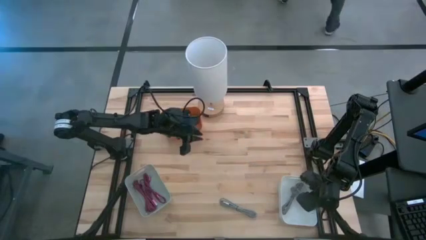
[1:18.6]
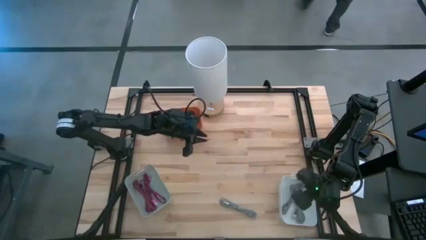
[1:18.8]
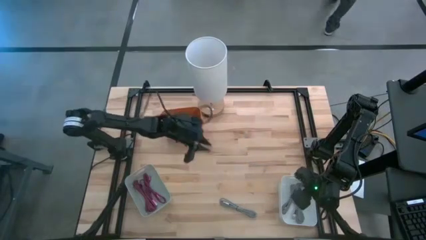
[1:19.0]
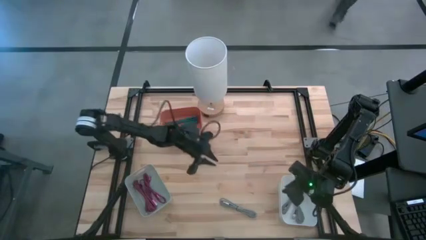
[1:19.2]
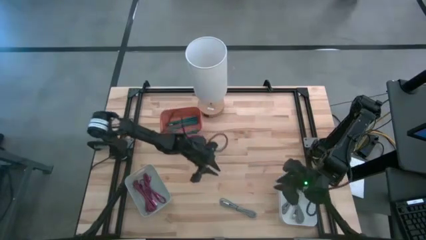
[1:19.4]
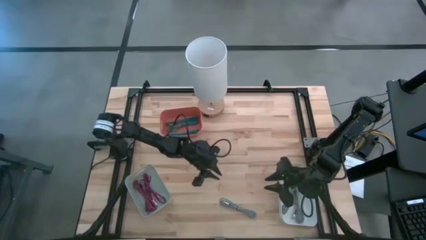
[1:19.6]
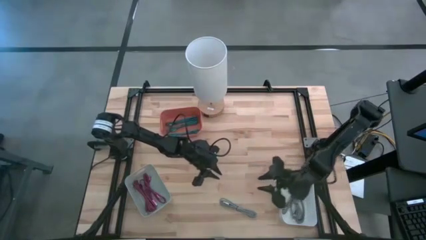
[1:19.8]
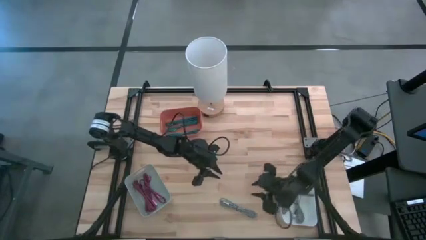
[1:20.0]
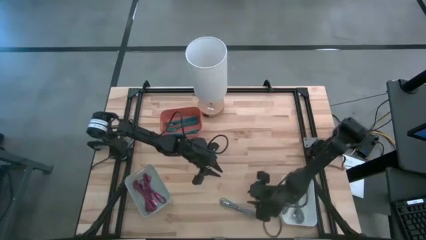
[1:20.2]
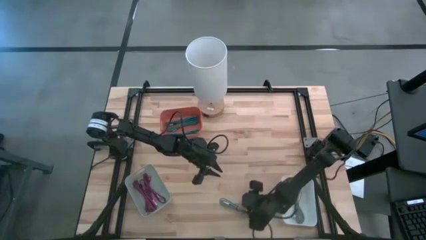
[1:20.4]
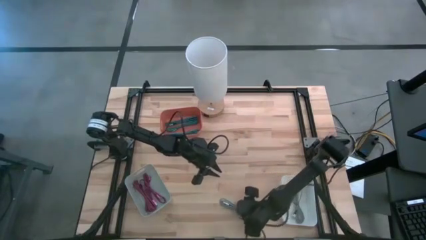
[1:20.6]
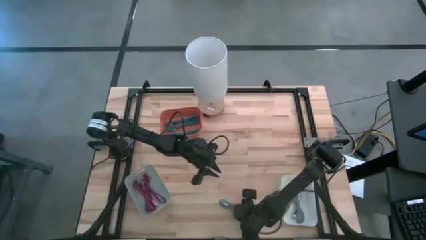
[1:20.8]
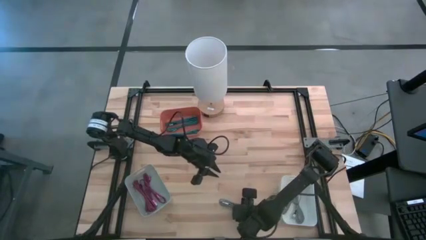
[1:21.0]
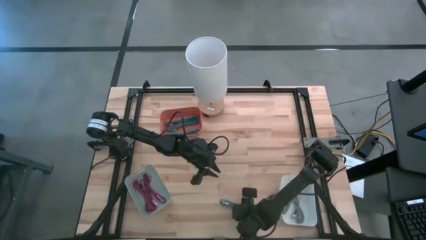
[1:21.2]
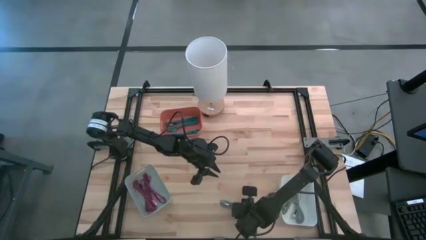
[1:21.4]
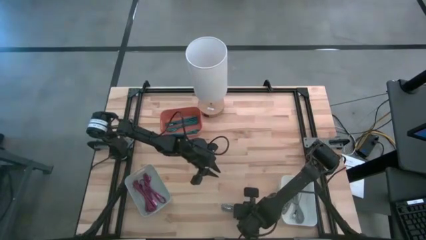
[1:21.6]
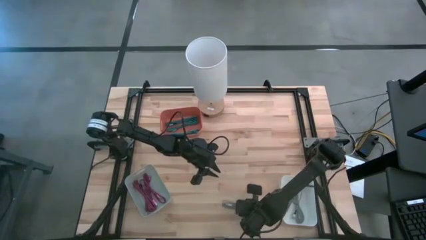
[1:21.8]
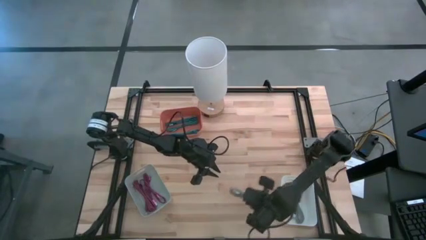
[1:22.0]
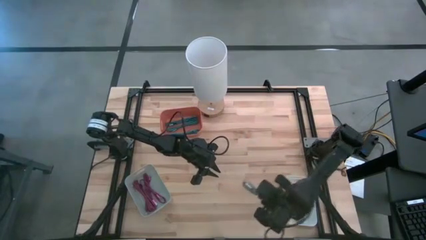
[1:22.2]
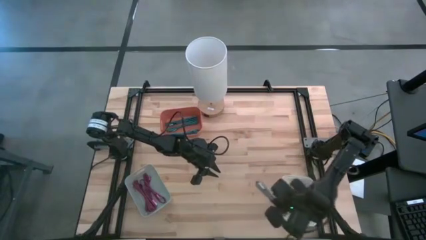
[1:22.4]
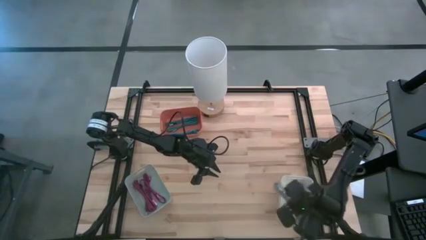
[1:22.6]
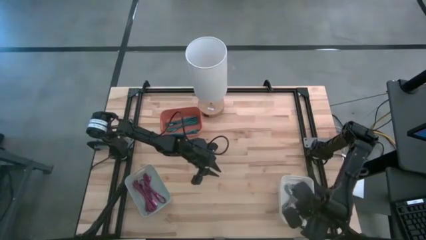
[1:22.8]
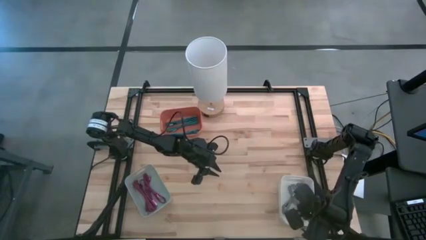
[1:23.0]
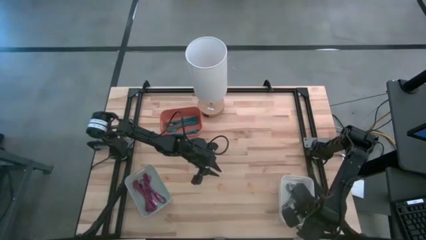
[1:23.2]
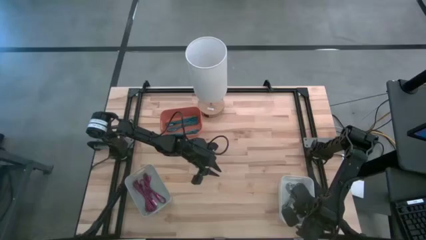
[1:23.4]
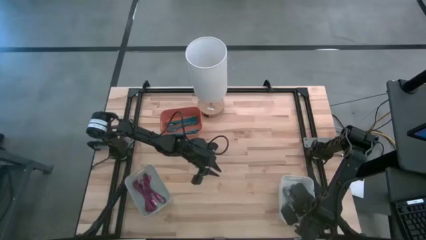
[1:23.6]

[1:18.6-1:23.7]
Task: Pick & Place USB Port
Put the white charger cable into the white bin

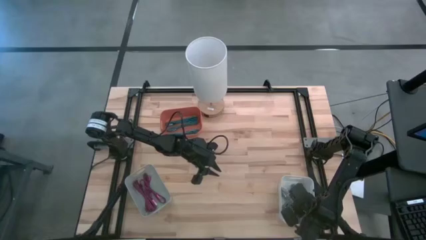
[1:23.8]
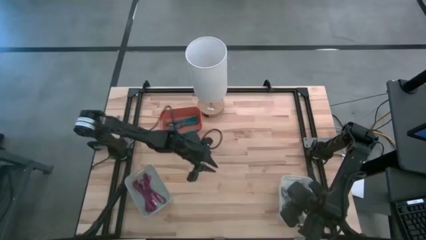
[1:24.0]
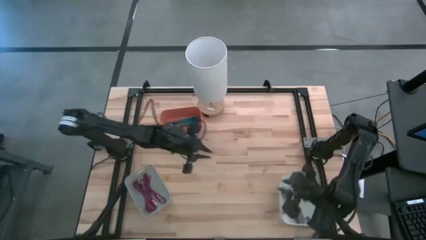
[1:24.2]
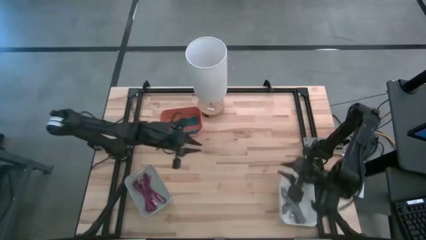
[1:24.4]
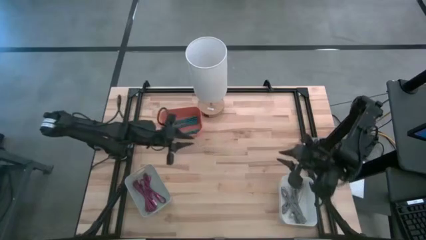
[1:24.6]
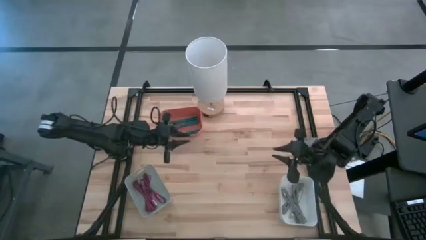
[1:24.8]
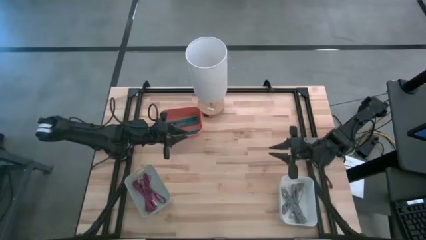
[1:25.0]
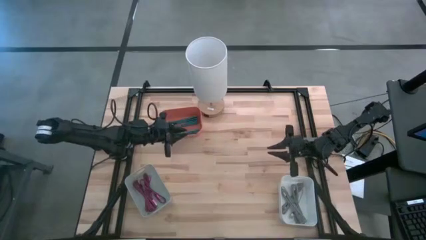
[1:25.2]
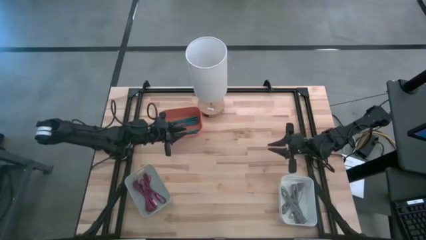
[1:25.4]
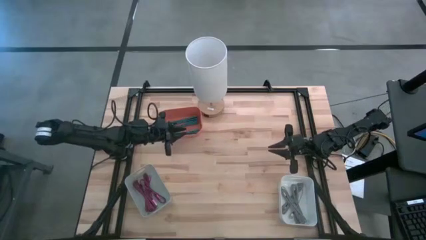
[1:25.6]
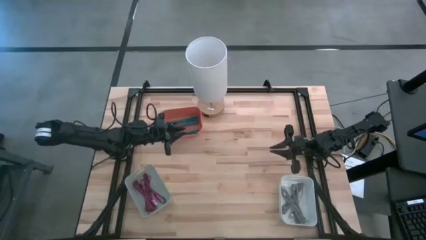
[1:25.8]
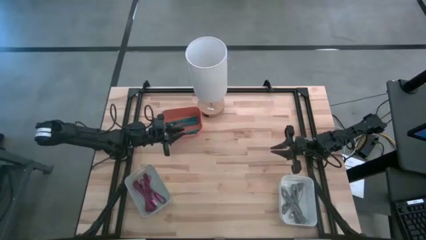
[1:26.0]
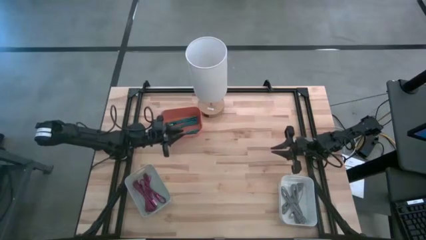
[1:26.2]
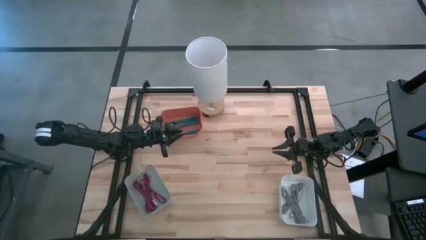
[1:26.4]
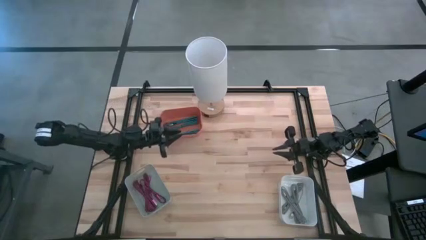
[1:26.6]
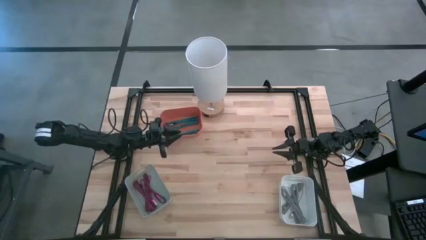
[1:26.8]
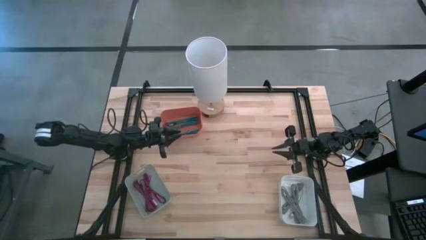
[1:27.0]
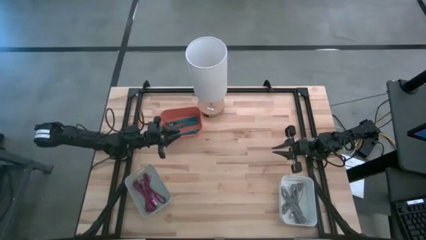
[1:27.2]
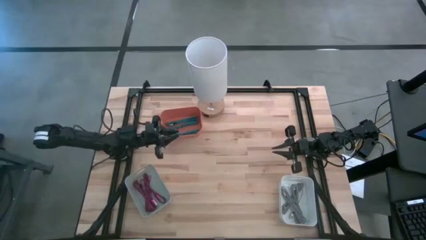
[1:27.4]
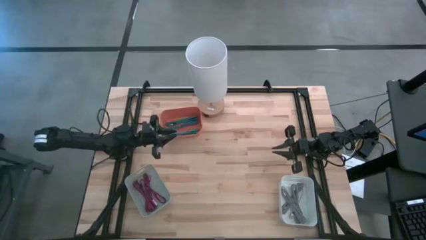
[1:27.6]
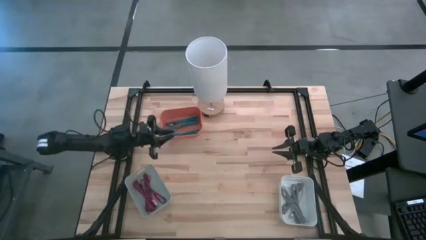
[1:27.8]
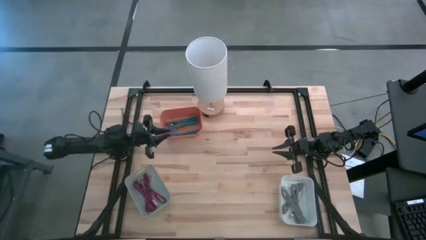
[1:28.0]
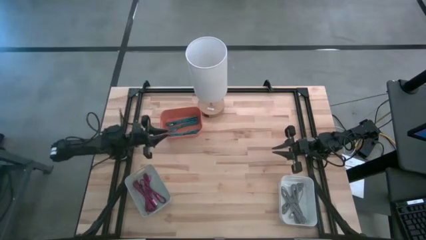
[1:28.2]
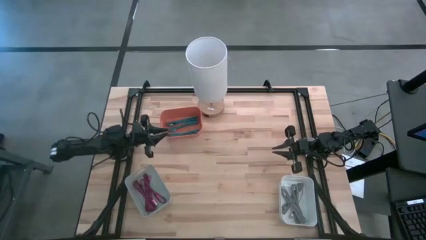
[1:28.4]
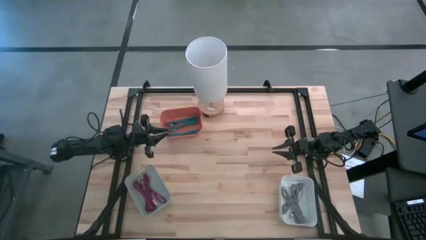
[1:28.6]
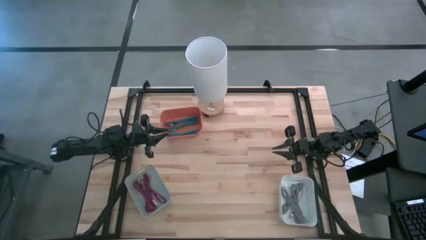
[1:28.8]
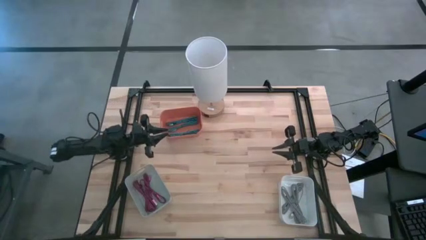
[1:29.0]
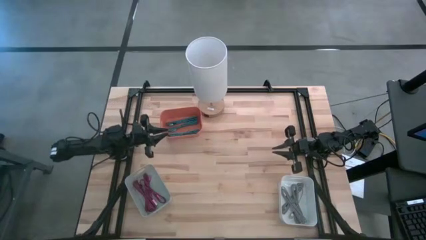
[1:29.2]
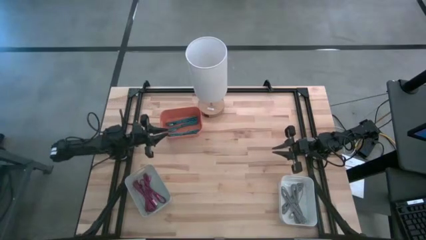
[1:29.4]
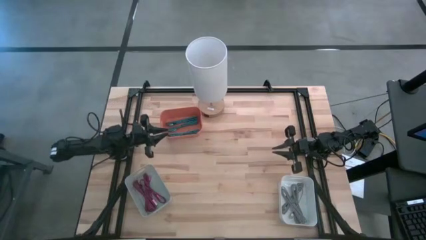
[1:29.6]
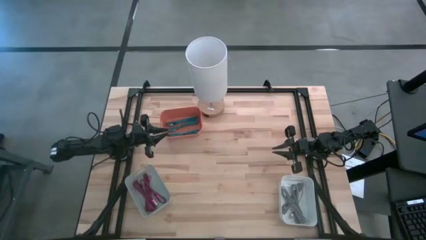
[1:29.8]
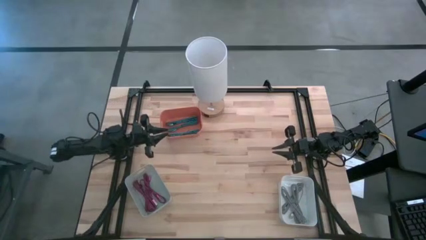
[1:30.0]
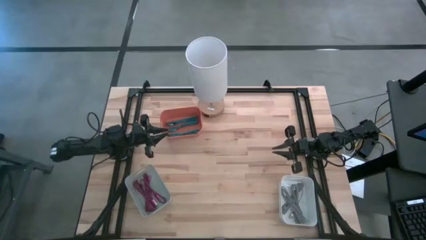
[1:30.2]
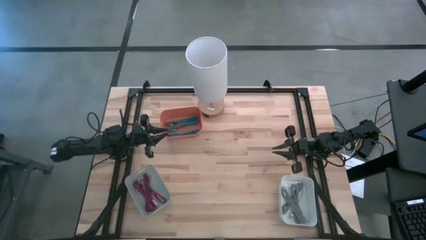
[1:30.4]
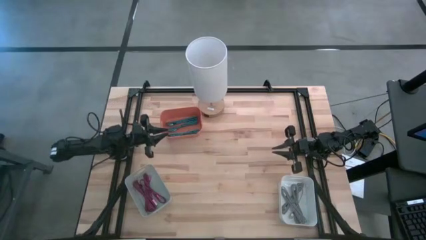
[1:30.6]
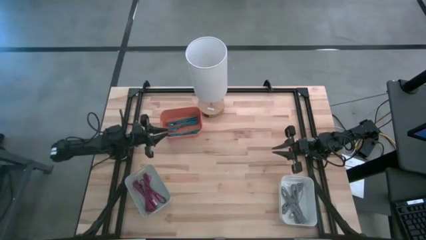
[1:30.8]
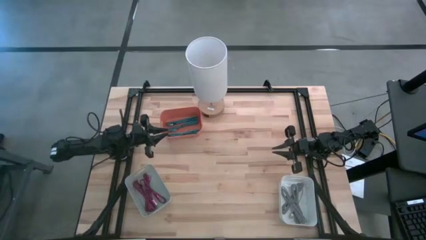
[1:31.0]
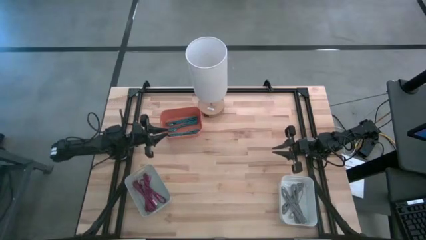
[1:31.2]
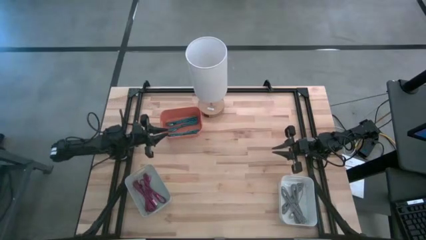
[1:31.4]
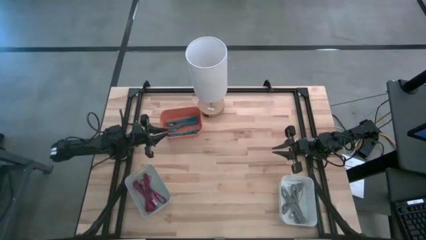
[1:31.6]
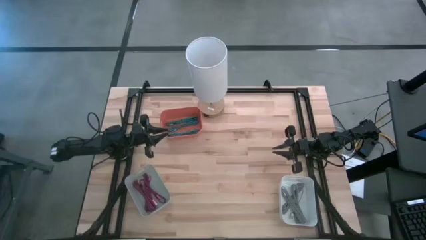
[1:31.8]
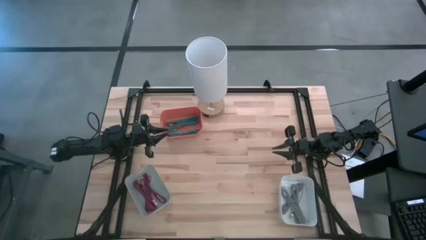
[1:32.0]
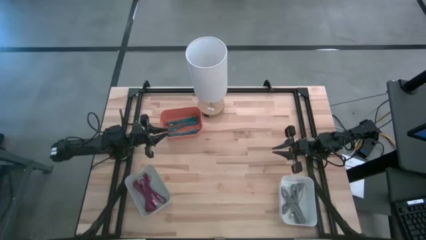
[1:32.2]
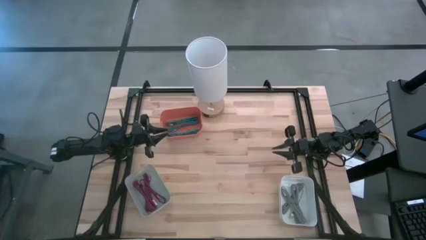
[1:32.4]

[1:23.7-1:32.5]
Return to Home Position

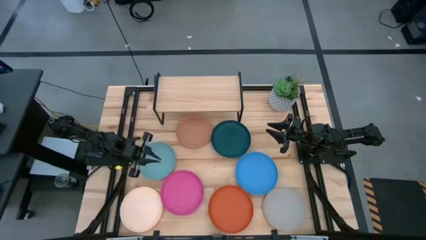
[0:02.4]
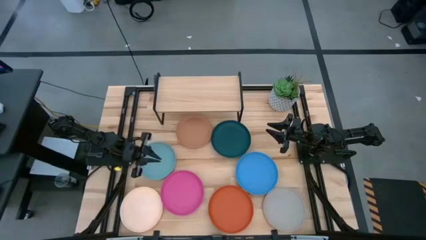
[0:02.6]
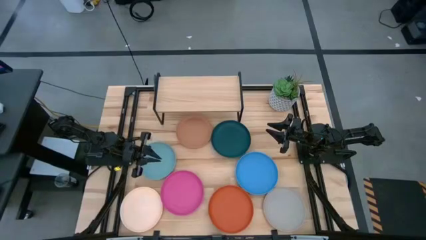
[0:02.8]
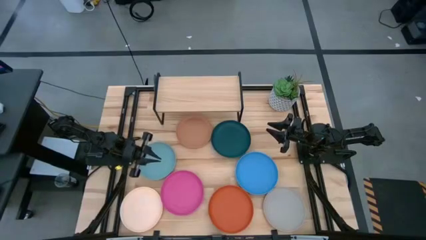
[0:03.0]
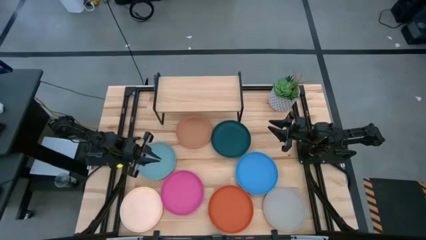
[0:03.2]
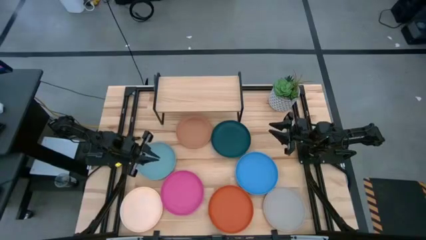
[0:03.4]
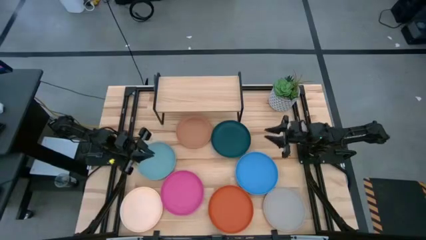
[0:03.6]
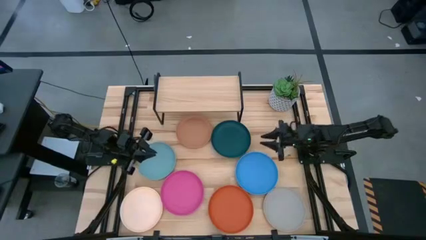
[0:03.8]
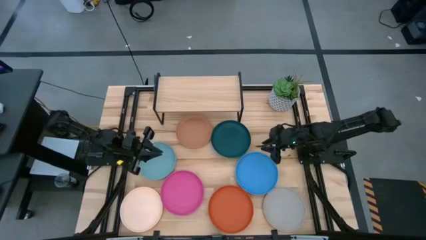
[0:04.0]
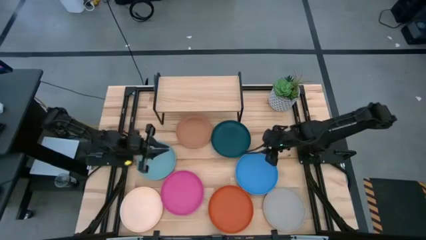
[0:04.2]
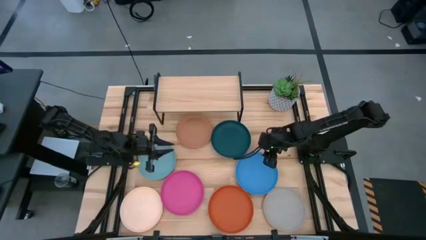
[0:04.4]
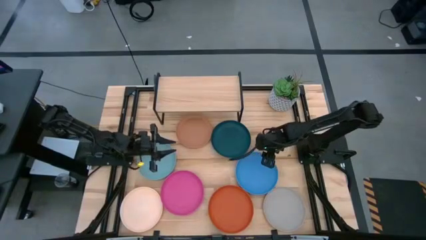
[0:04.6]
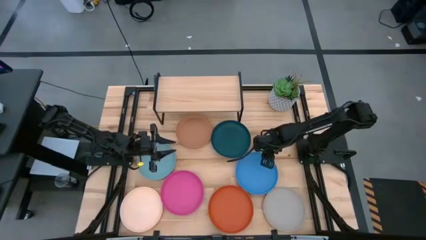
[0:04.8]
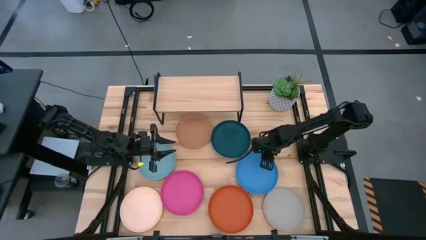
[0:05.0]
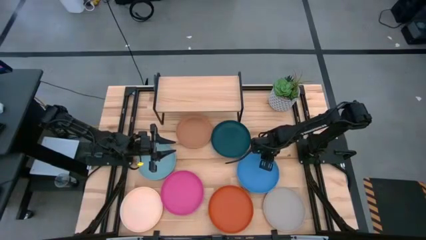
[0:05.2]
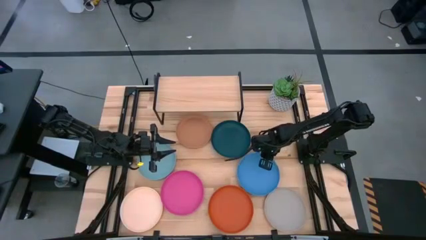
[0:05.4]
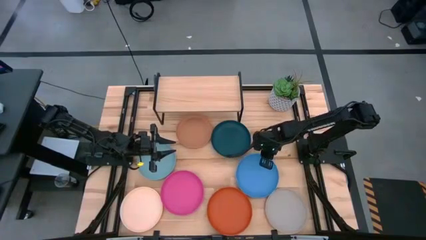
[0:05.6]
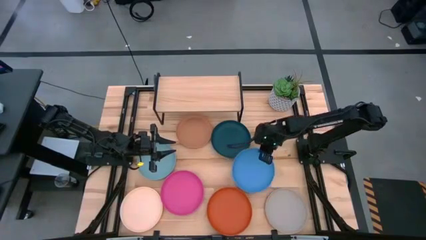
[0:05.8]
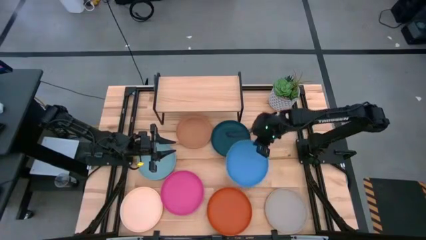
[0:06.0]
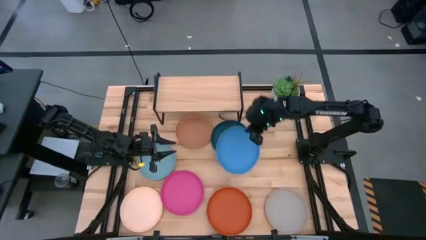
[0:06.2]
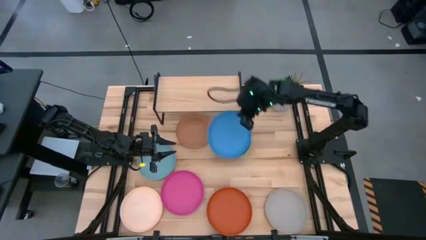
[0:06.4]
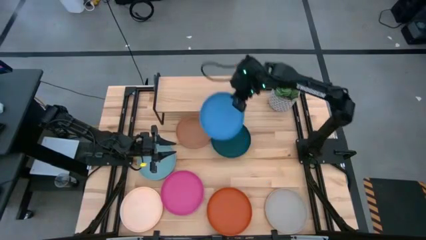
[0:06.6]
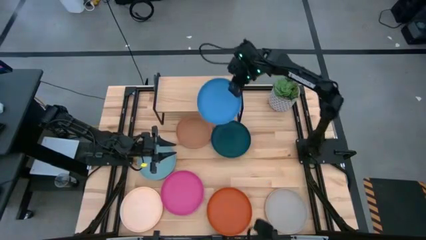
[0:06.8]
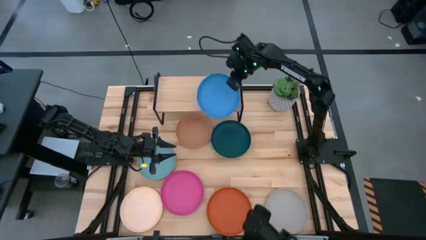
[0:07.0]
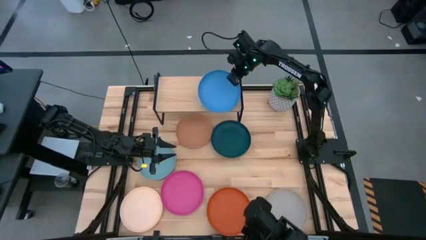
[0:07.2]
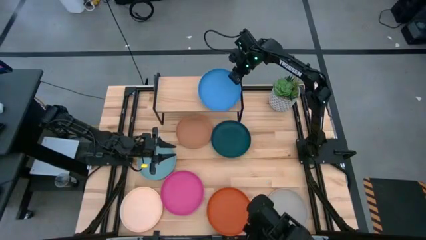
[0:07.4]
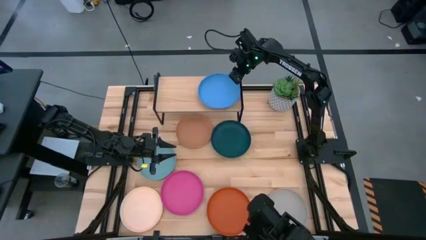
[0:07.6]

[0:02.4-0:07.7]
Task: Place and stack plates onto a shelf
Put the blue plate on the shelf
